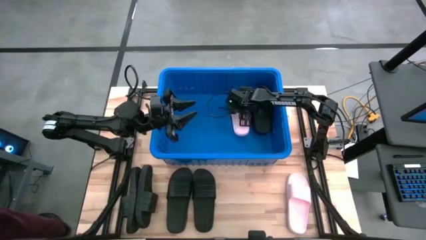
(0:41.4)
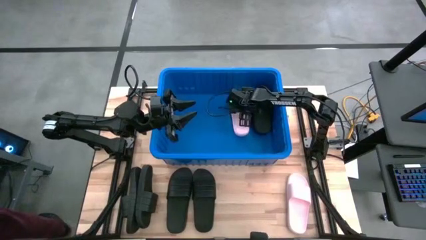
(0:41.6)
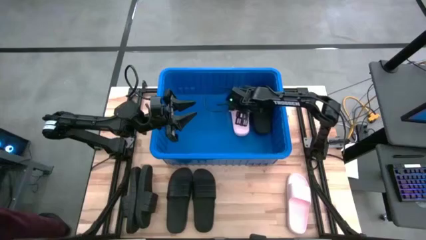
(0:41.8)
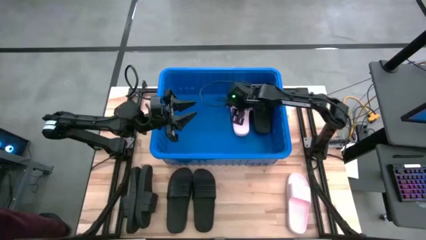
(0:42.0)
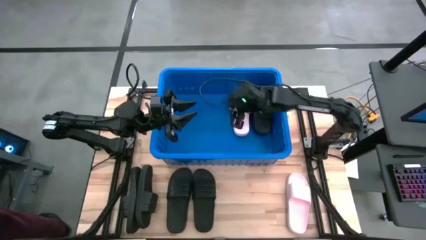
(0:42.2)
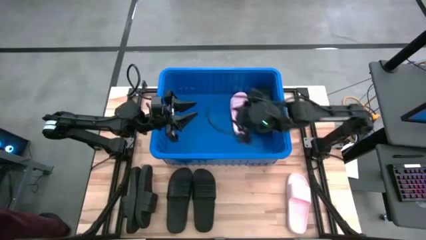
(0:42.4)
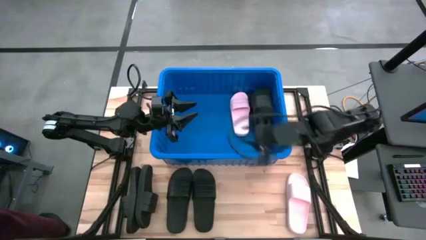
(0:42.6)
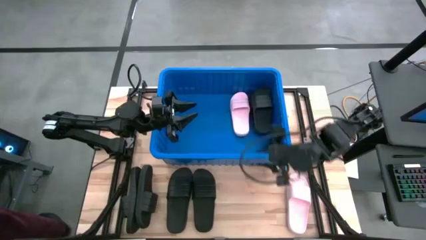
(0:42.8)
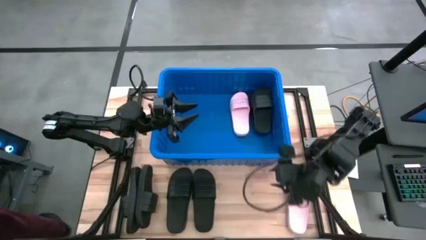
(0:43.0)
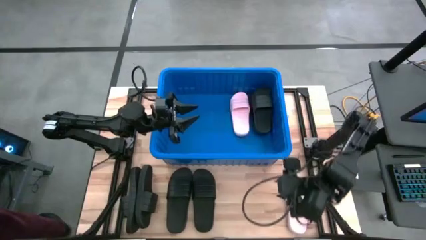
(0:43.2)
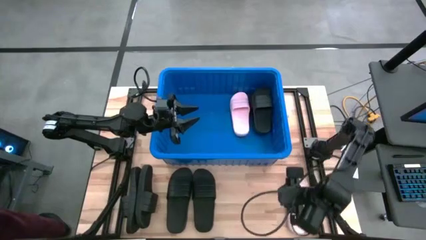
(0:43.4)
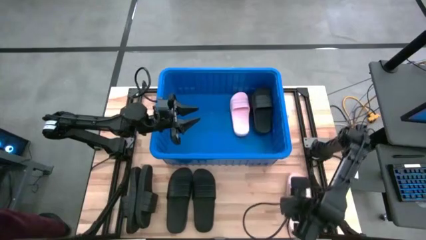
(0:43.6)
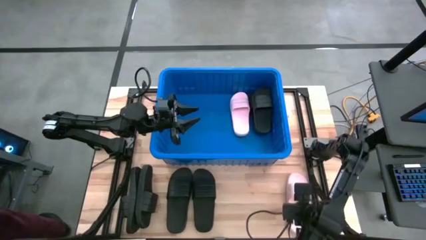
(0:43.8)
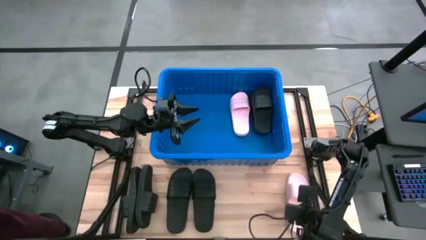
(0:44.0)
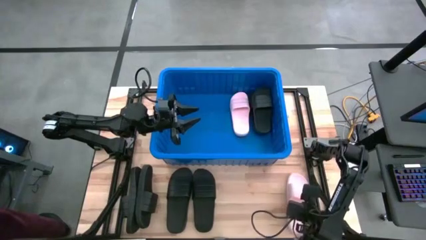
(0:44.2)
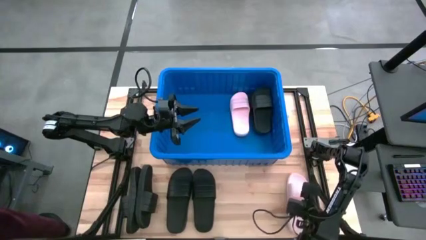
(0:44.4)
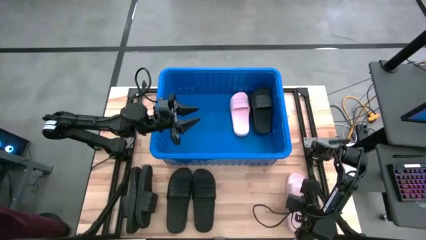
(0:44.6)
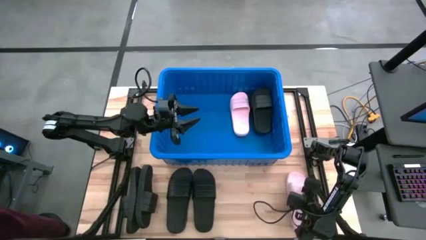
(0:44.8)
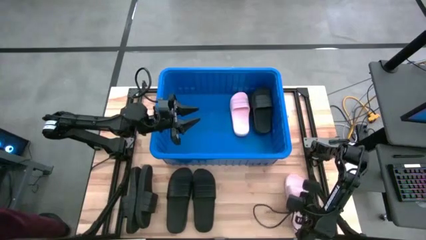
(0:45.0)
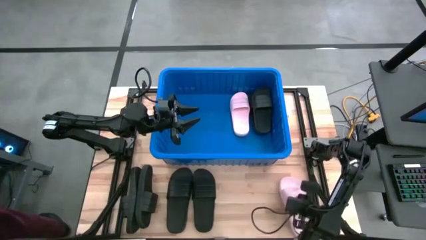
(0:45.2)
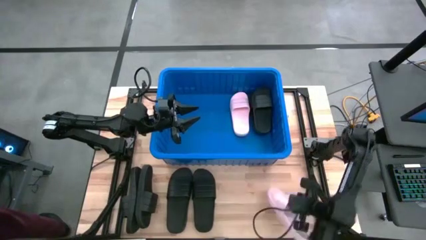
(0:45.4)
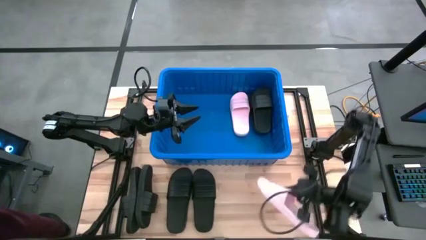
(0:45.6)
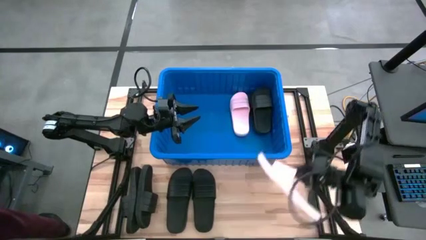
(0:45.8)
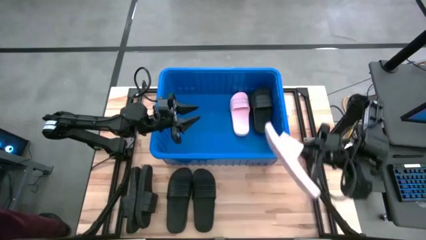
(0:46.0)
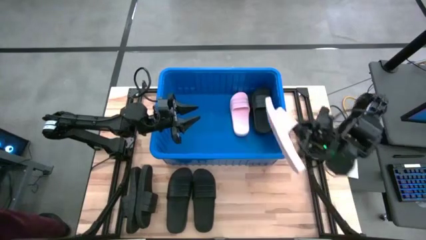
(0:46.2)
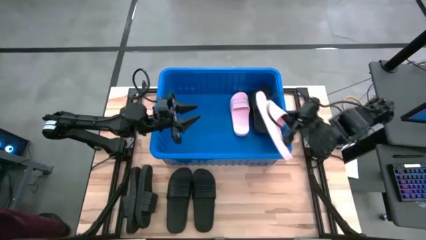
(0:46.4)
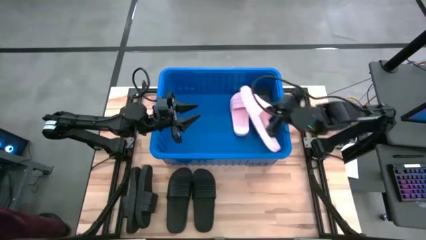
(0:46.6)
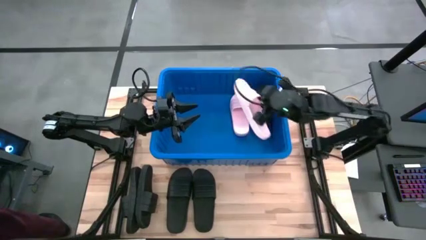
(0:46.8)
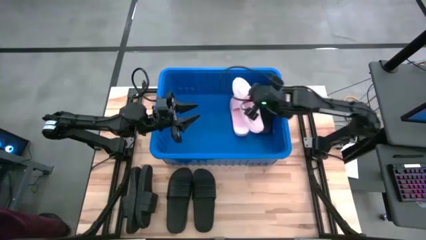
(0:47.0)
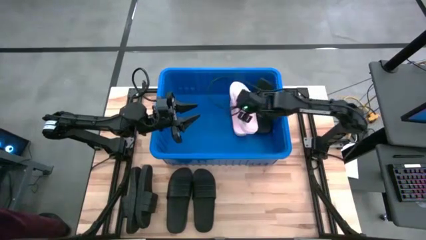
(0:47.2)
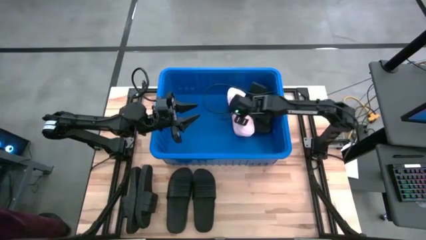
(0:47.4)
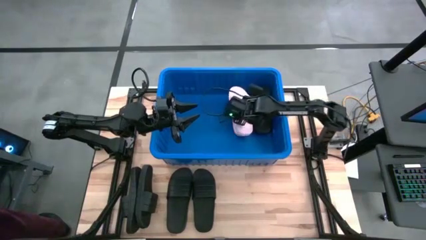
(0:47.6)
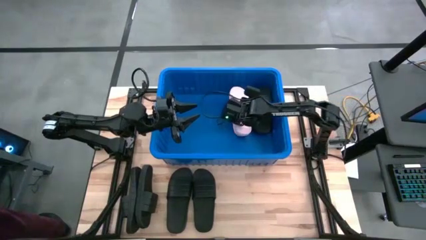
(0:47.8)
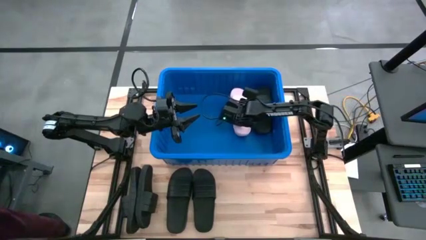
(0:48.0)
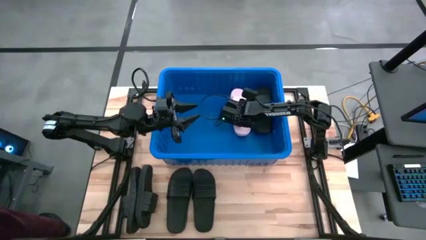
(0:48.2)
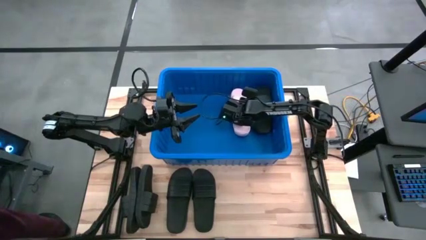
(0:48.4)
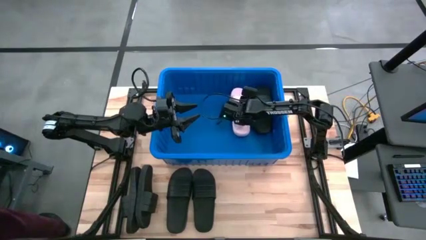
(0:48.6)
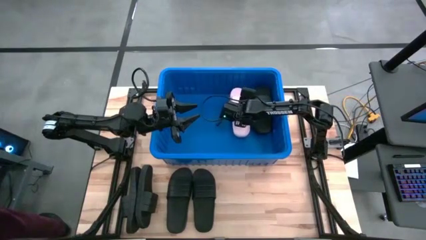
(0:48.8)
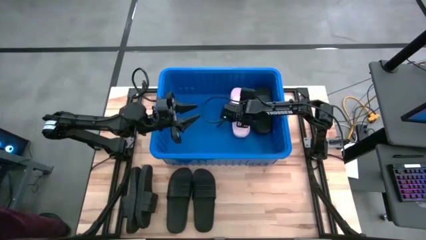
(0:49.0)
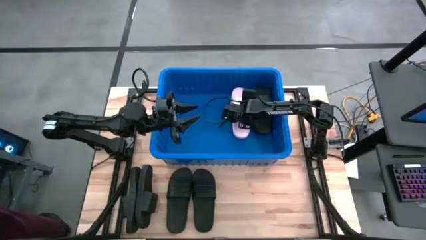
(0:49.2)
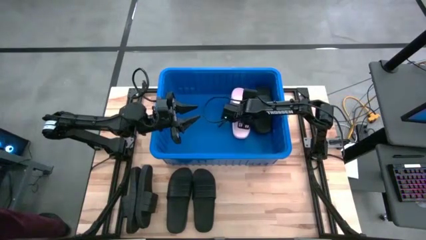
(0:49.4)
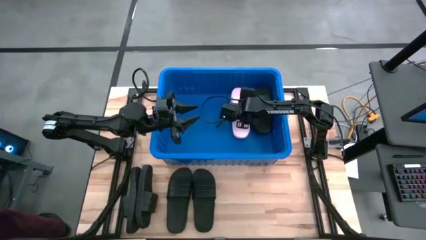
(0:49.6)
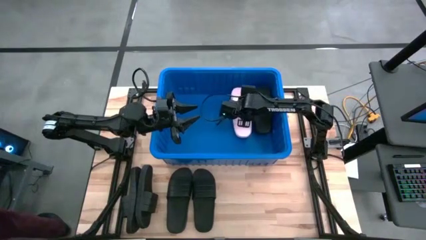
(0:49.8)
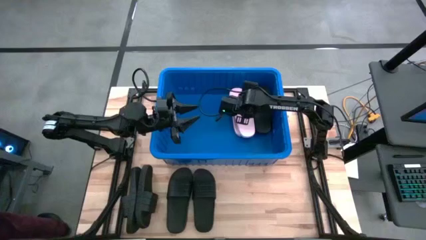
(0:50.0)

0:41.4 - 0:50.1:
Task: Pick and place slides into bin
Put the pink slide into the blue container

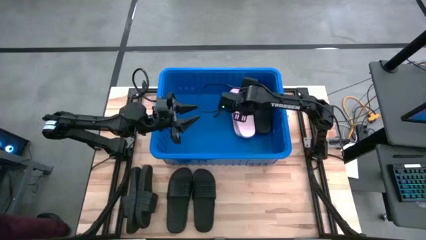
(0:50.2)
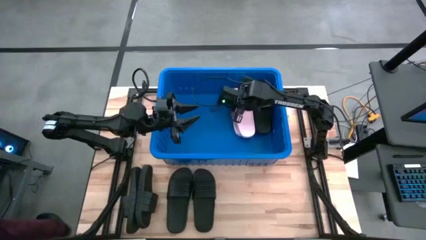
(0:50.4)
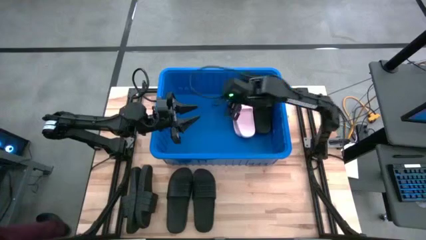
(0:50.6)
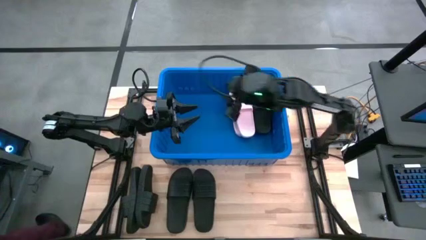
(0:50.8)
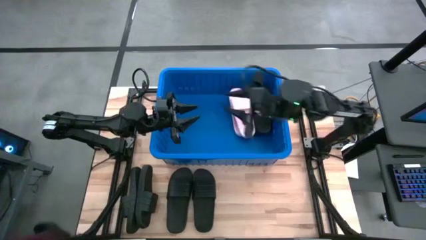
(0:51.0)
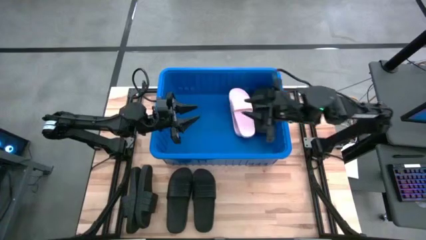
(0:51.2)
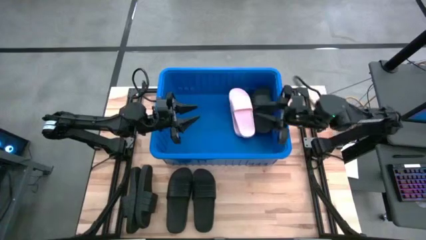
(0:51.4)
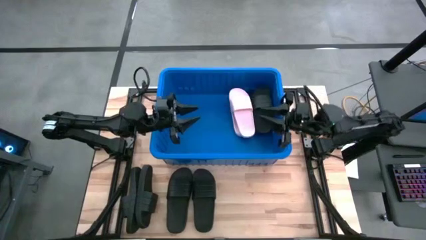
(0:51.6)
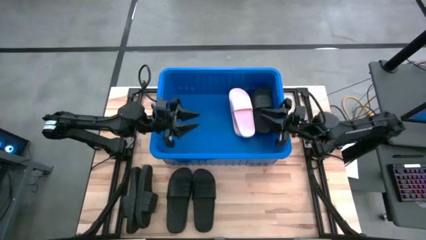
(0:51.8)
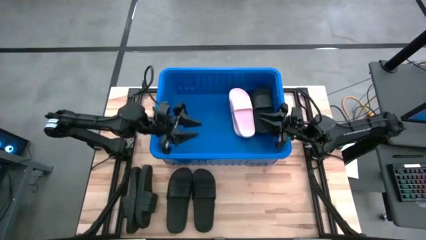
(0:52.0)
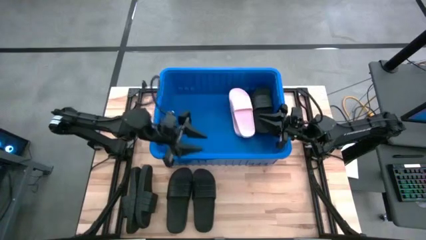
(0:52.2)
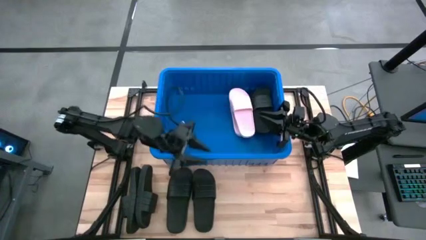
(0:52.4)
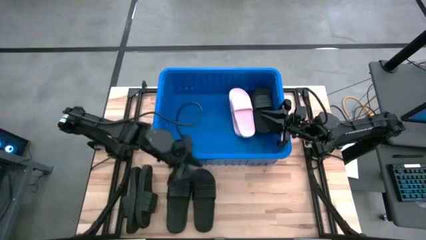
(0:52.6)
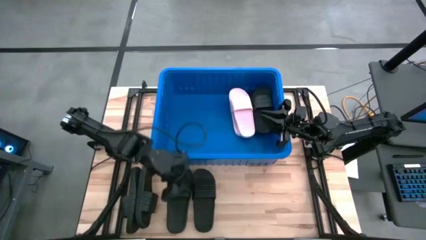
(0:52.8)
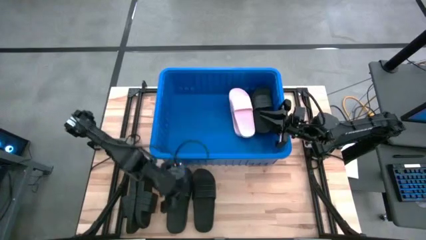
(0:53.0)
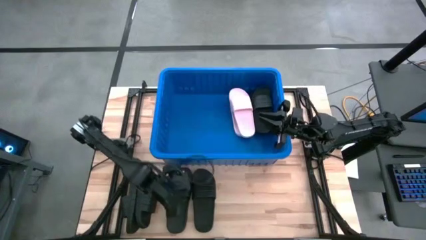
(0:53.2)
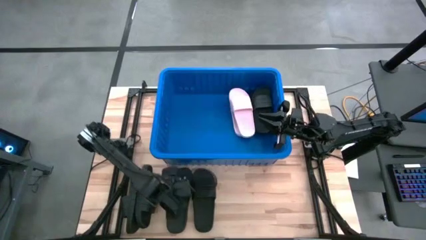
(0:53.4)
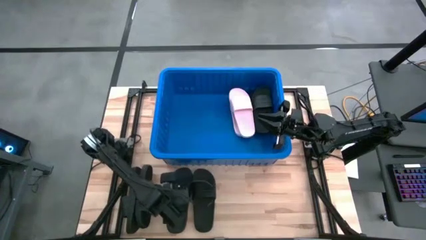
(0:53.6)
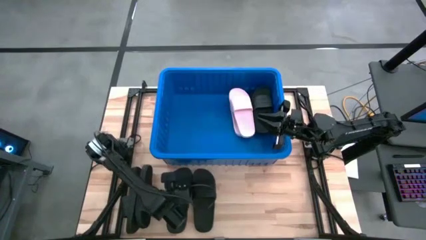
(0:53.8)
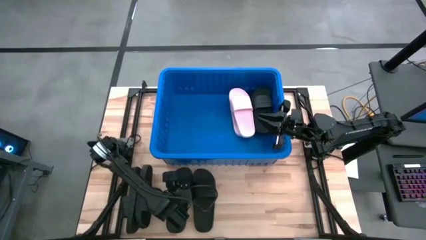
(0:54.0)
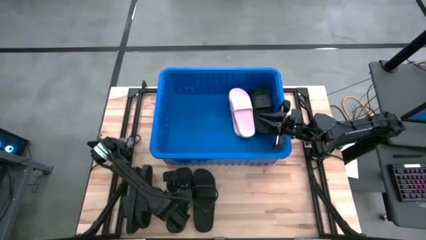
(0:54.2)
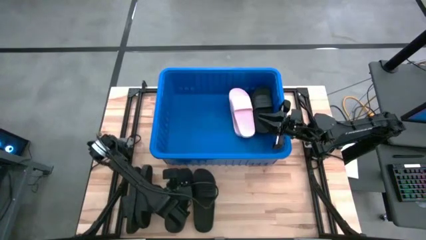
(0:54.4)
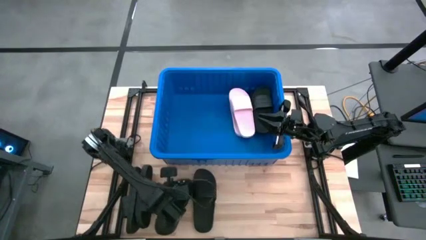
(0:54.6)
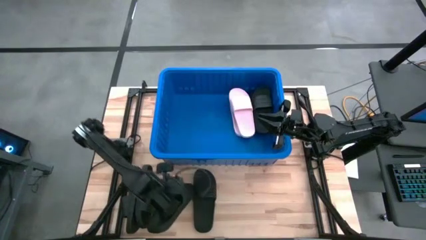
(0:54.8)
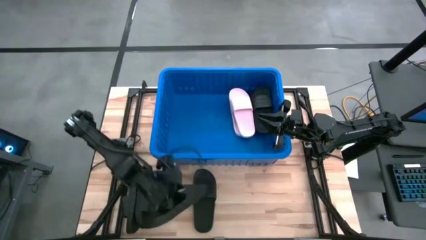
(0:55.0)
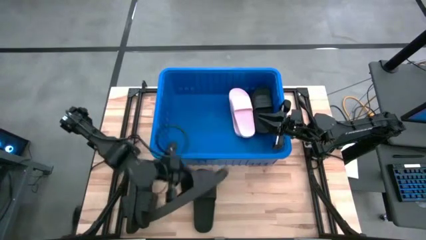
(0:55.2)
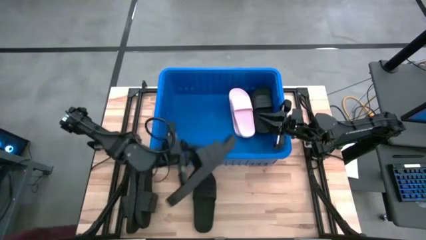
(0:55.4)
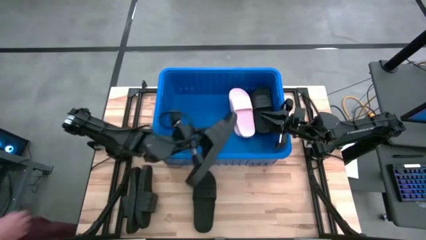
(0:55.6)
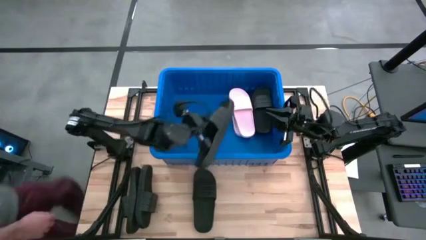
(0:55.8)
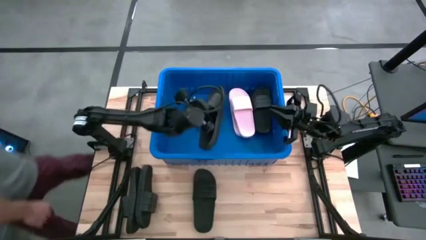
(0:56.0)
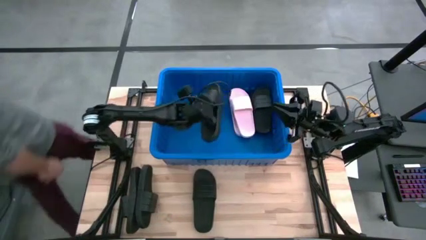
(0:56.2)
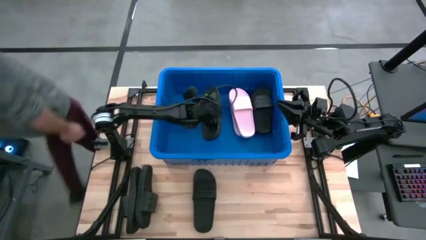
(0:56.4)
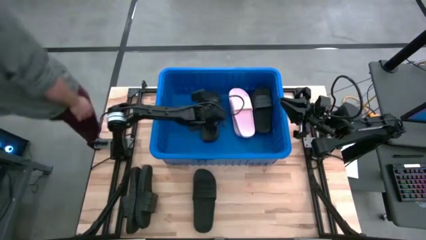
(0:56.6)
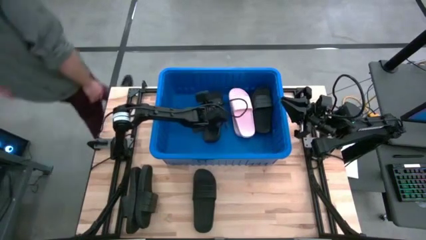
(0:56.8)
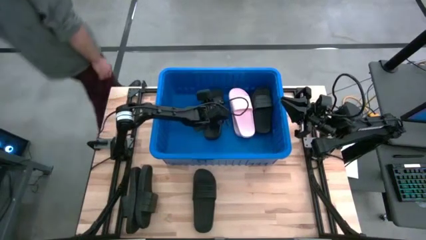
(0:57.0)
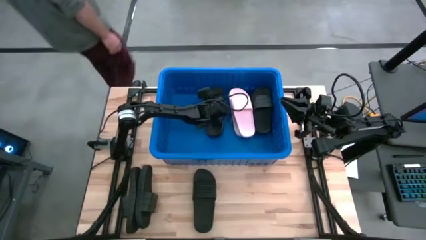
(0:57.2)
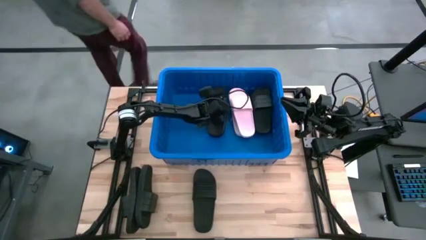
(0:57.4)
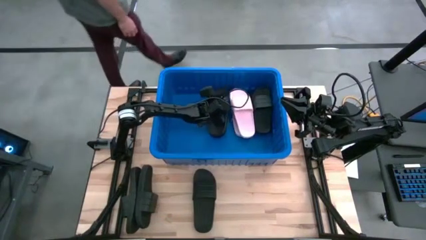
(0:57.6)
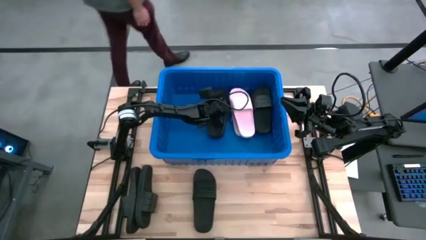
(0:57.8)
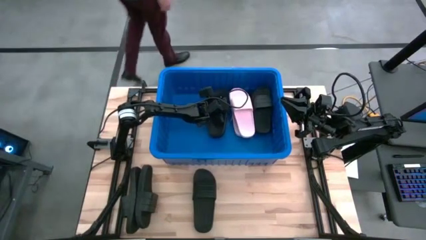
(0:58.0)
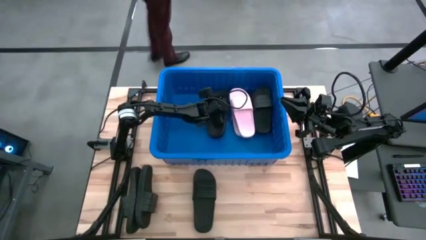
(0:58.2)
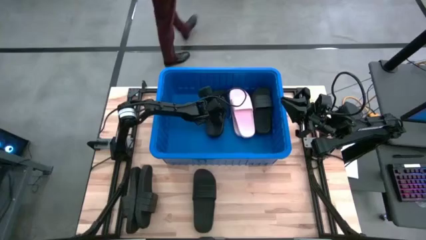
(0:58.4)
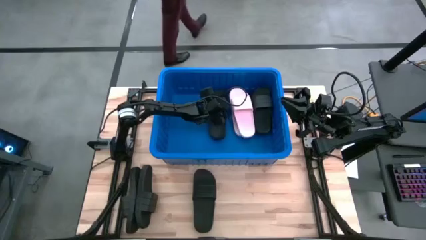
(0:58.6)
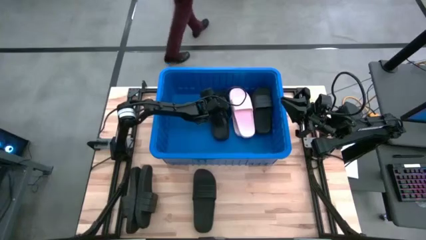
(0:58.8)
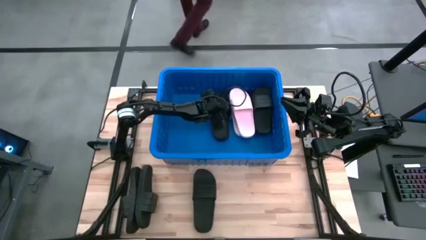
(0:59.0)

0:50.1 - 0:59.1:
Put the black slide into the blue container
